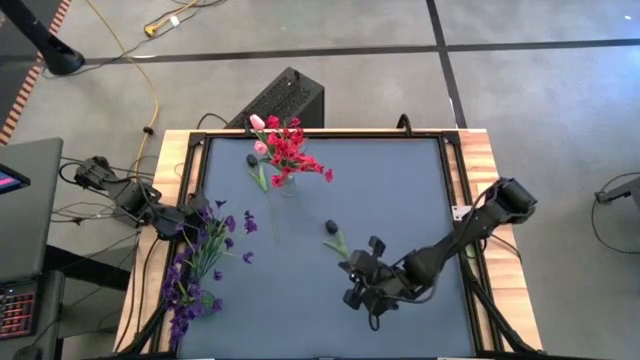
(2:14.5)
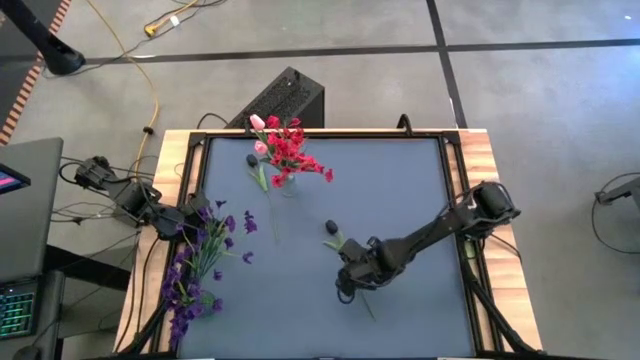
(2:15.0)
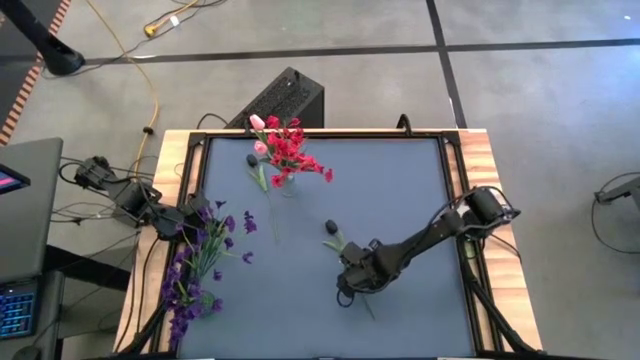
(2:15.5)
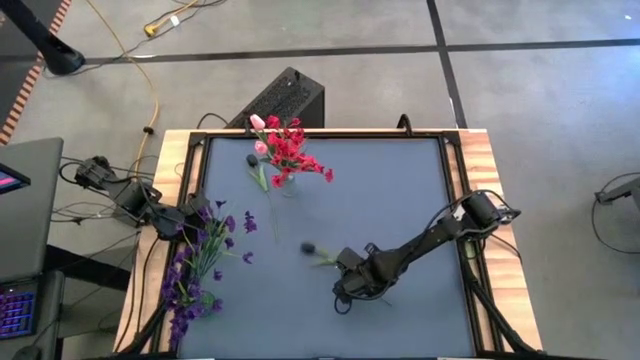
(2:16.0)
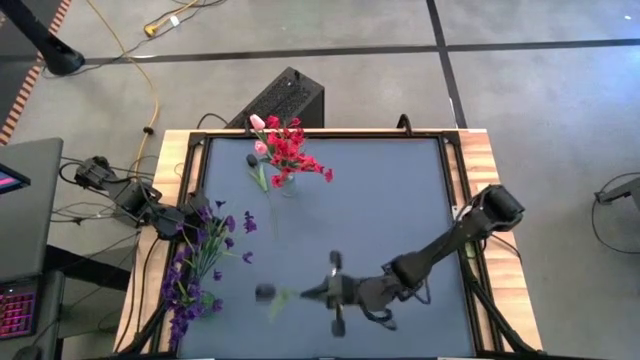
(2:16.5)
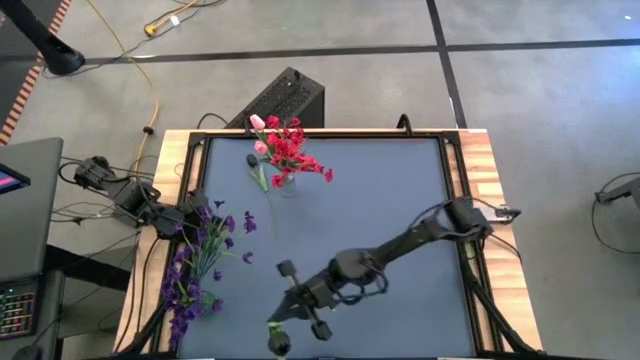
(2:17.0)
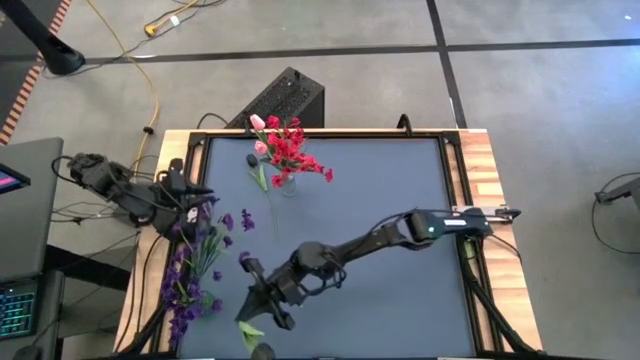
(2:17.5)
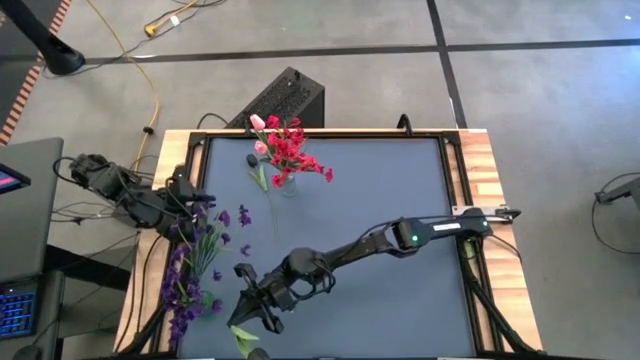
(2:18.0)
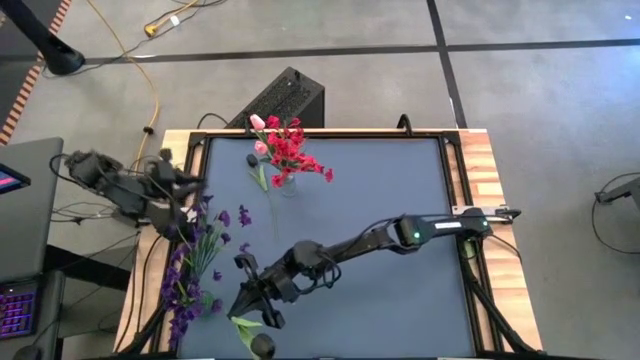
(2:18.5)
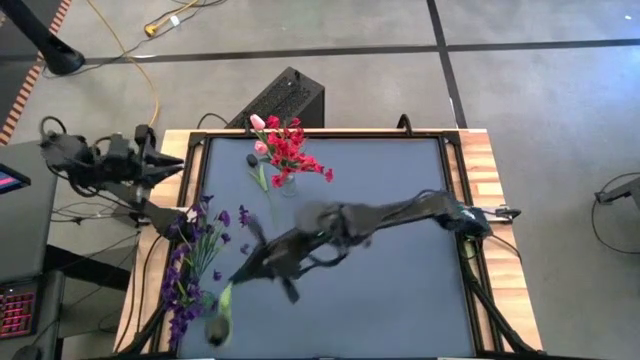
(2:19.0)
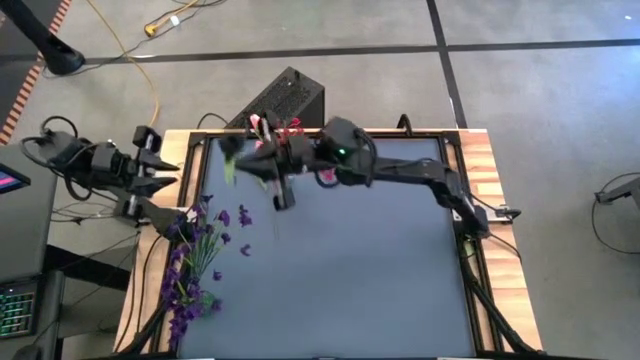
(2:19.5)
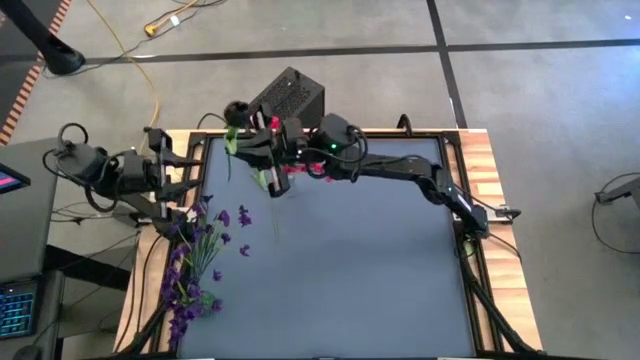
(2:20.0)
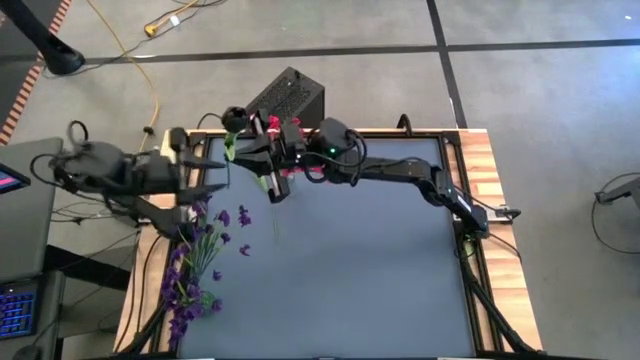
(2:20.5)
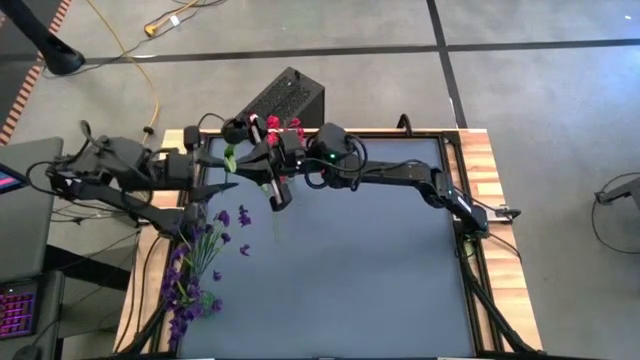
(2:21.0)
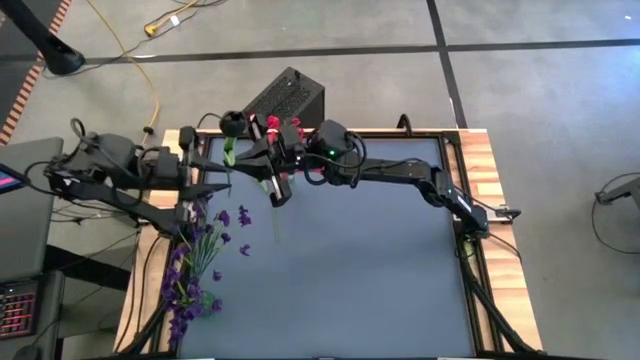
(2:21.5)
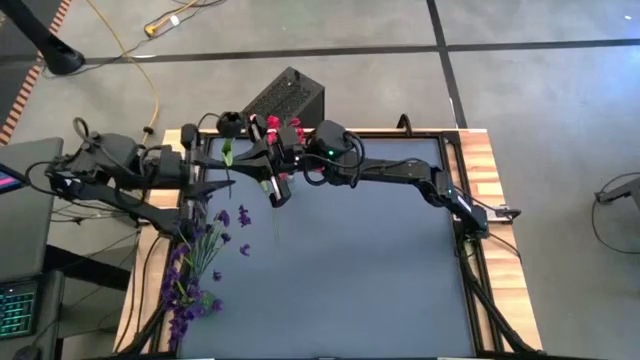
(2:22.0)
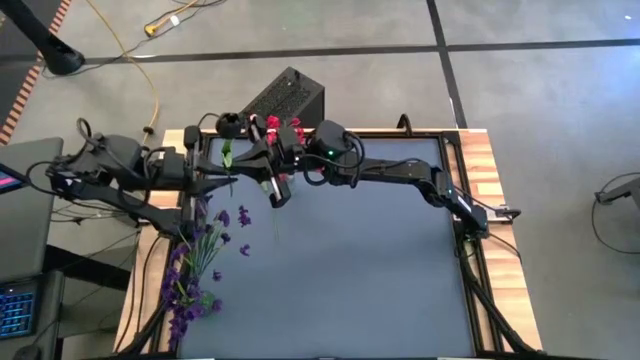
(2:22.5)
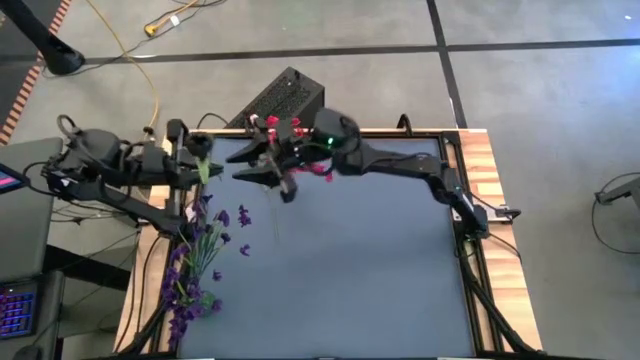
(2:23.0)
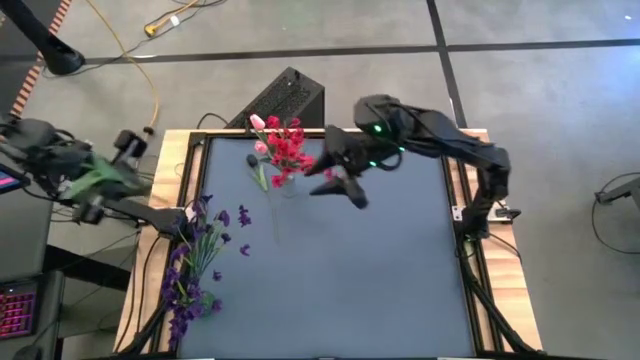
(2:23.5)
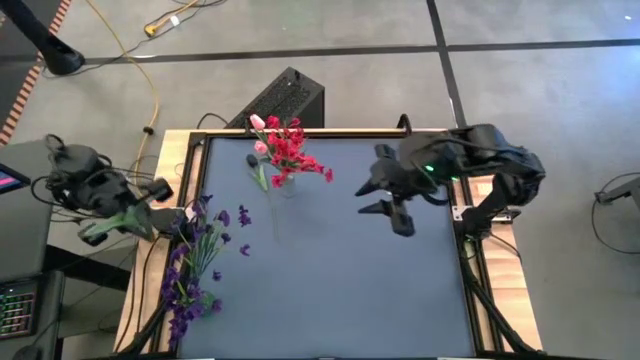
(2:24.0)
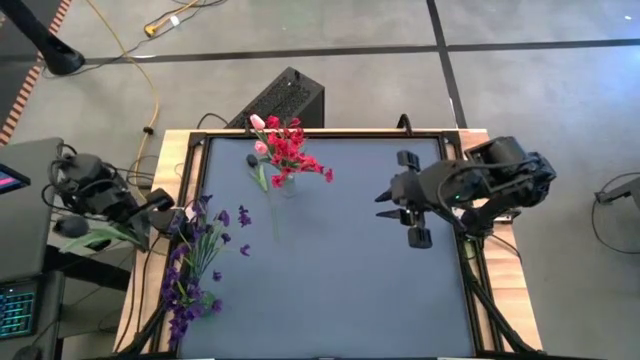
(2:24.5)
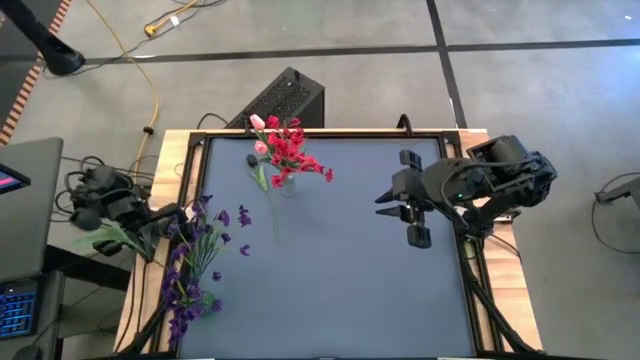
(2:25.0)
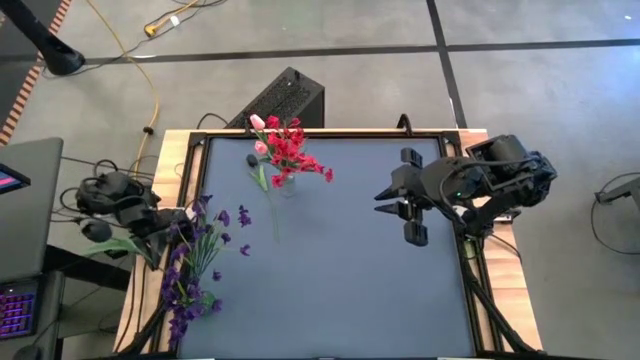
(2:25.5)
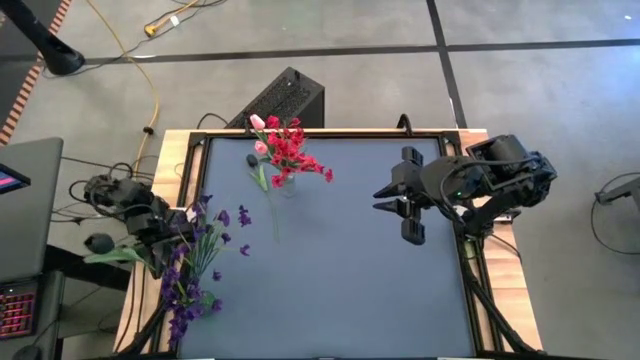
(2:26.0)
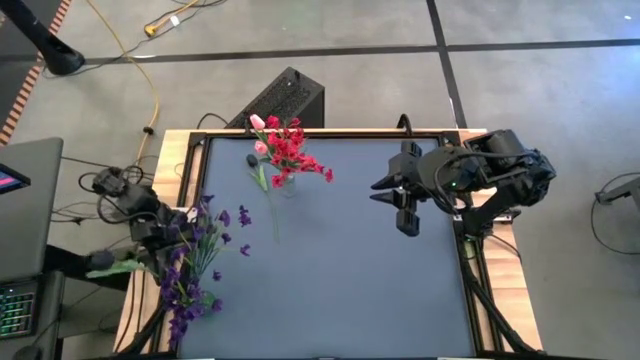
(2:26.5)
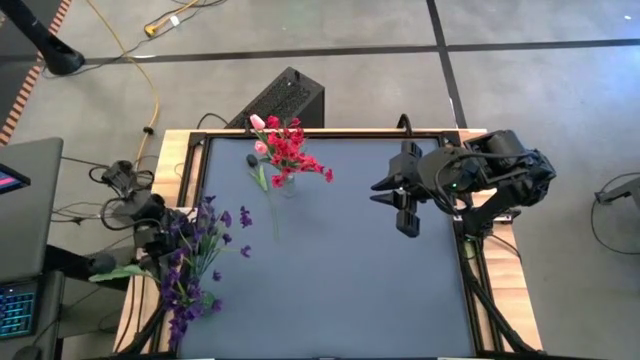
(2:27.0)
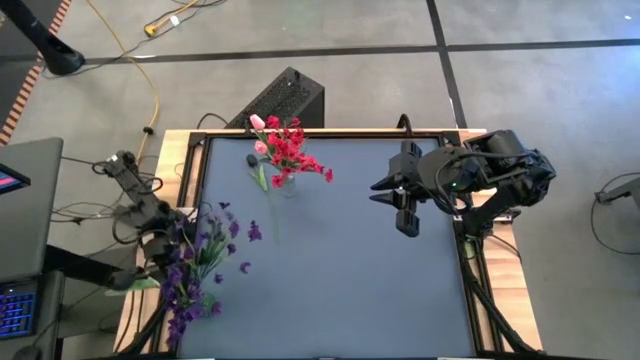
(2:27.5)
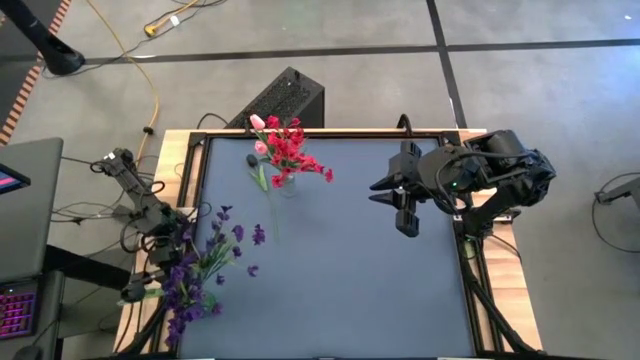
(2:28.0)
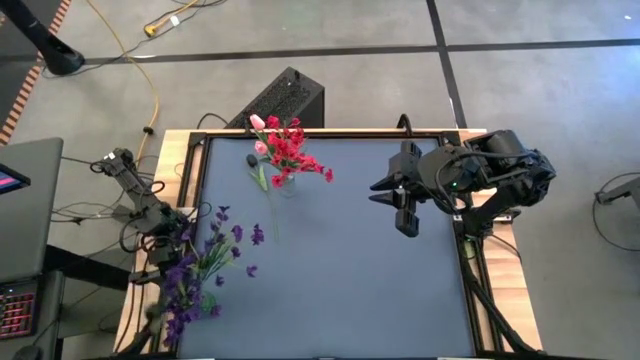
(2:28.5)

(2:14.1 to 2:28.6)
Task: Sort flowers into vase by color
Put the bottom black tulip into the green vase

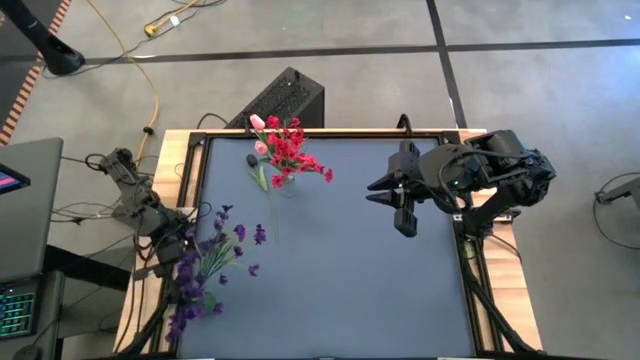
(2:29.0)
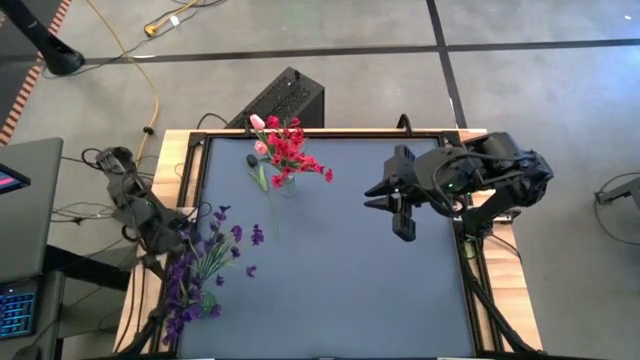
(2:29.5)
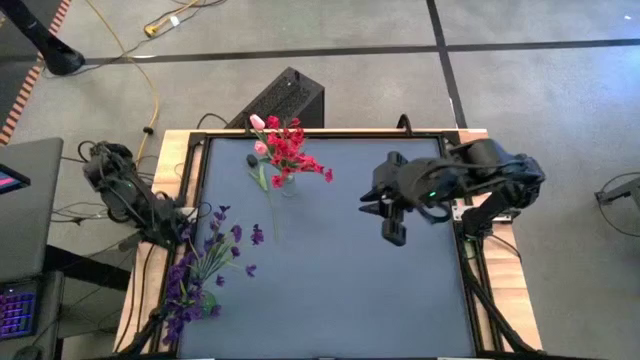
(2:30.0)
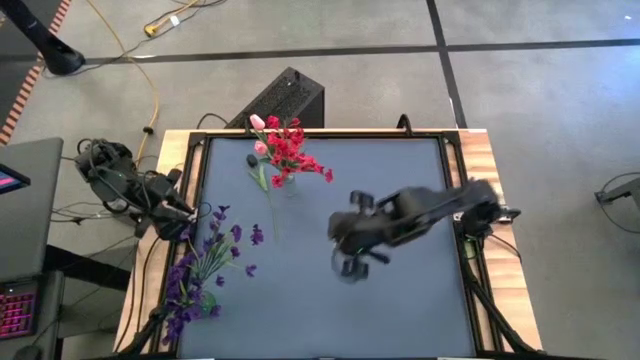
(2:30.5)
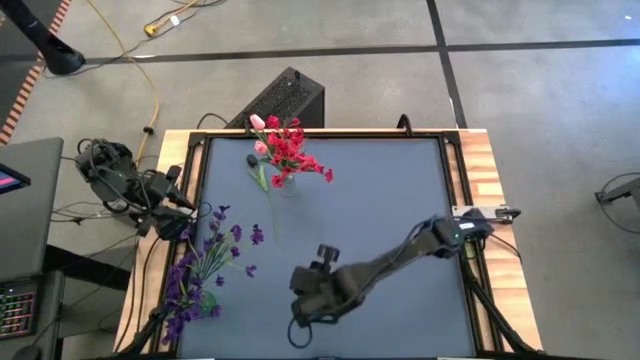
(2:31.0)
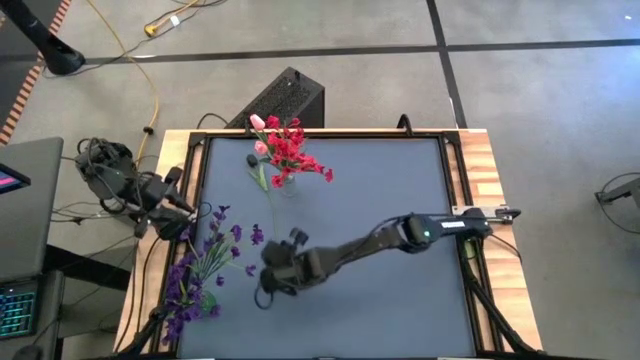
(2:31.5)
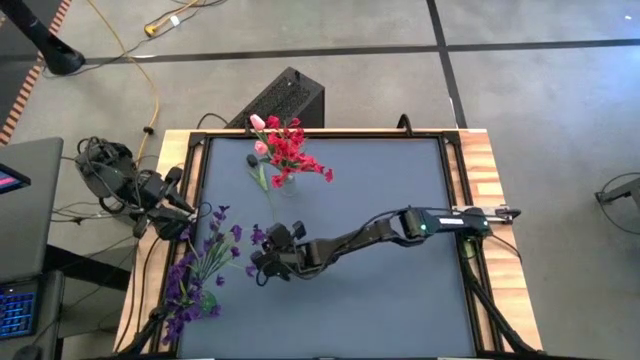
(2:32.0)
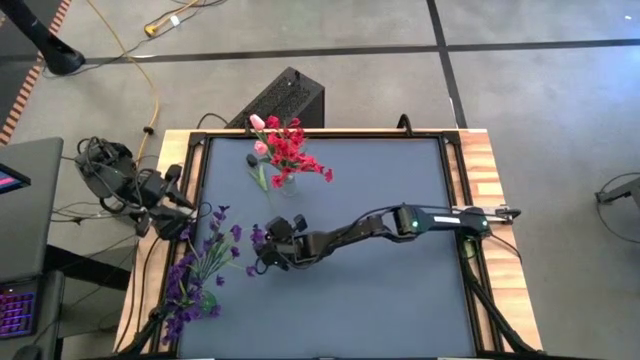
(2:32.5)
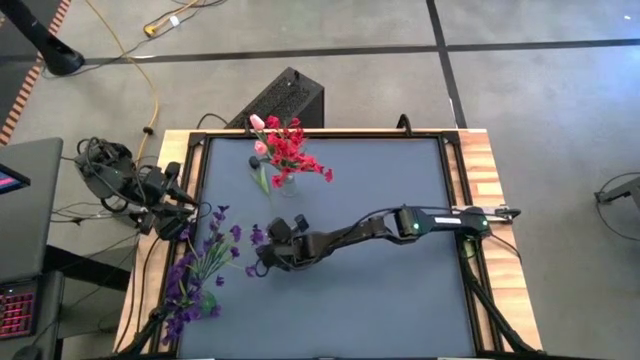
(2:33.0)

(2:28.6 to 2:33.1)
Put the black tulip into the green vase

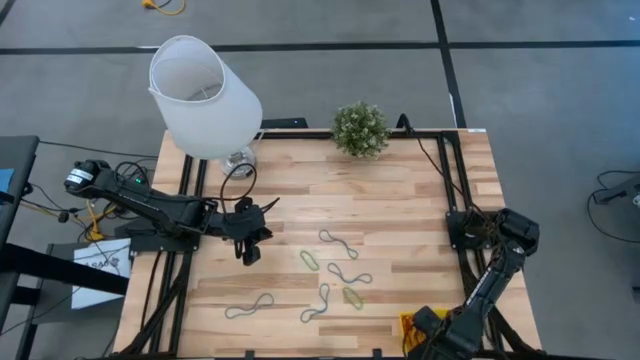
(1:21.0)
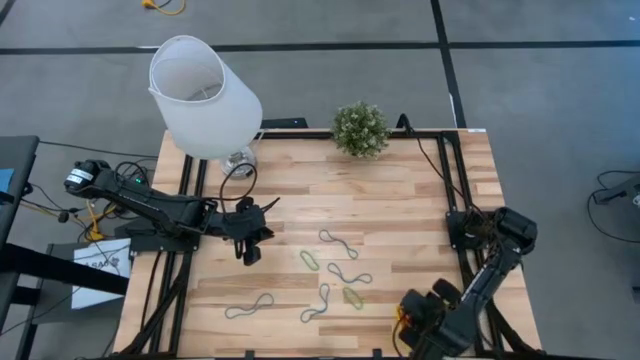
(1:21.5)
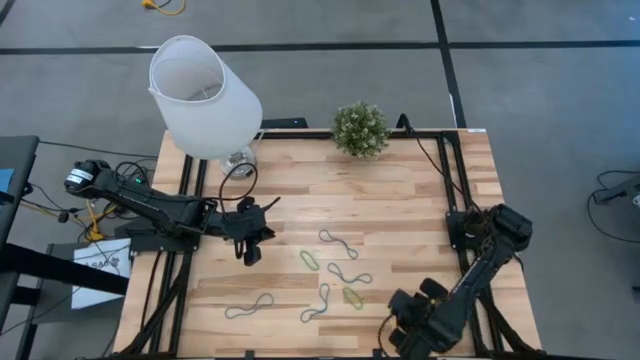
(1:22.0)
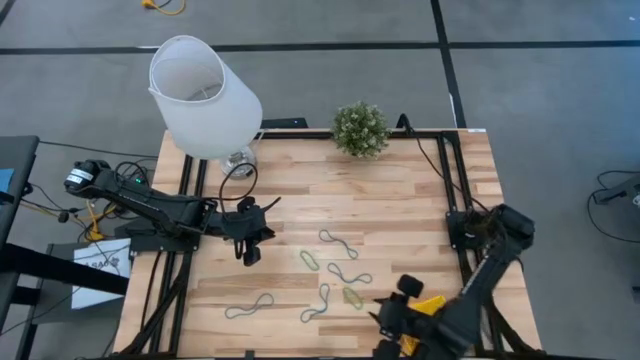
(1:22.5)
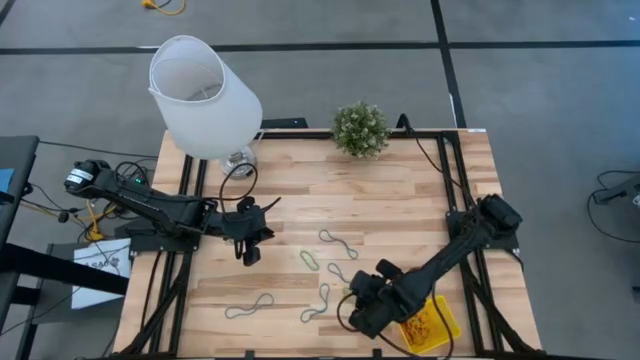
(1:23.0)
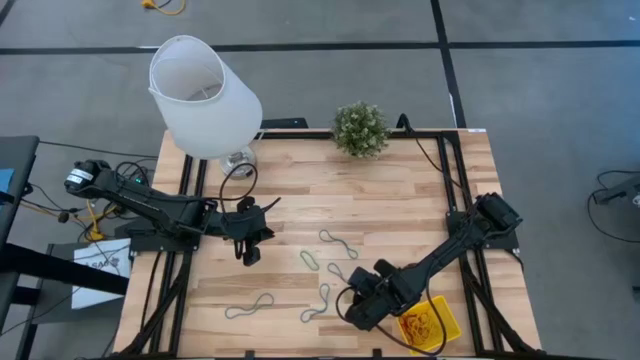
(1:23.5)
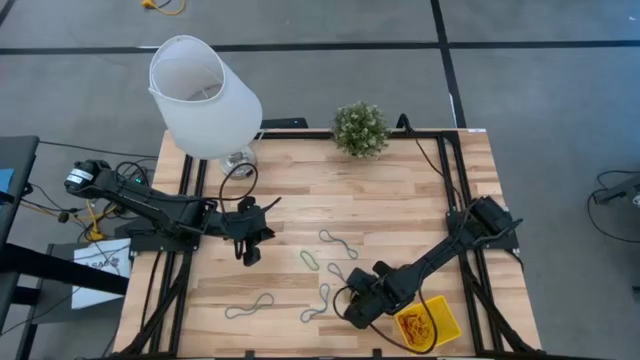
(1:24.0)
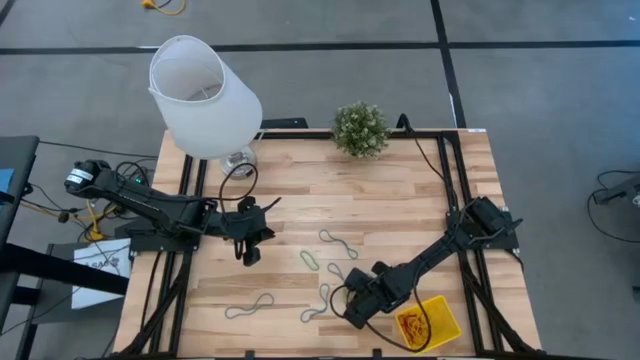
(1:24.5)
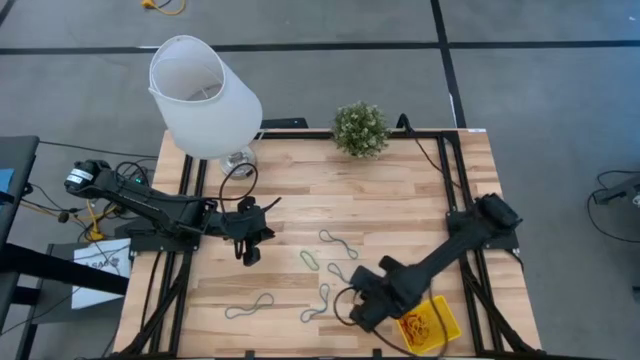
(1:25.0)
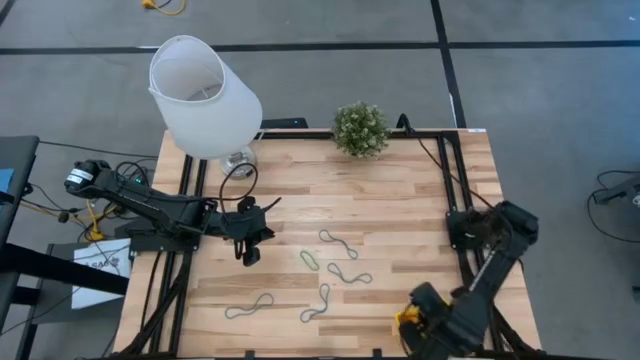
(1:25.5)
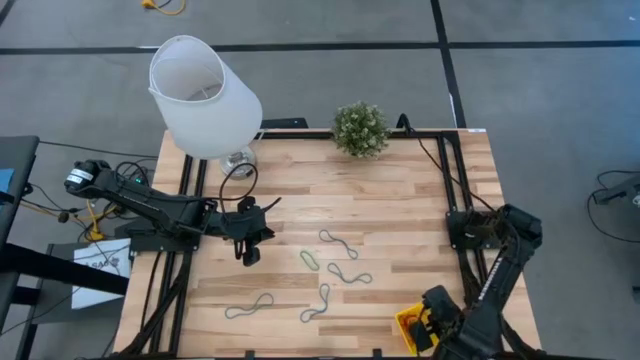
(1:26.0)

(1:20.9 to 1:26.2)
Task: Pick and place rubber bands into bin
Put the green rubber band into the yellow basket
